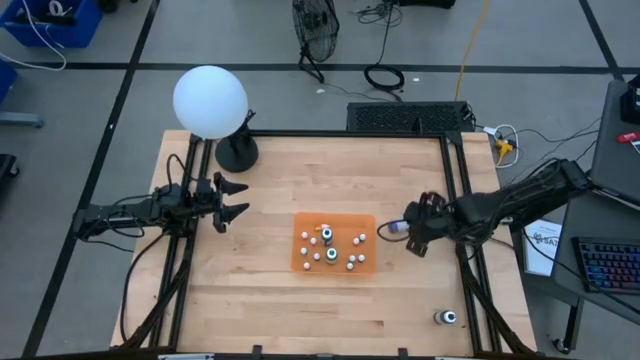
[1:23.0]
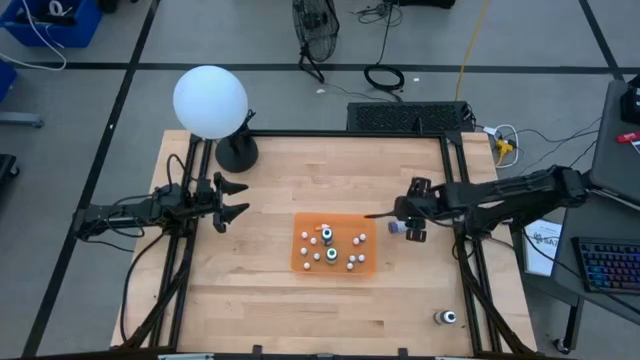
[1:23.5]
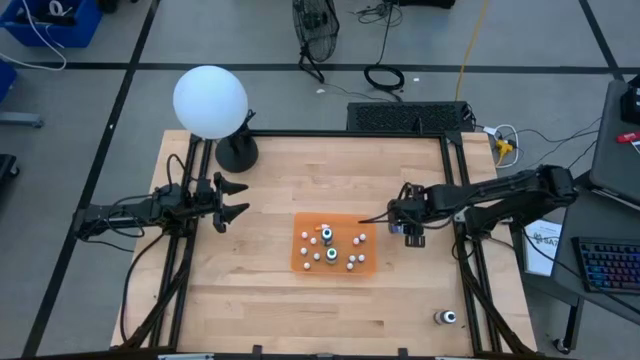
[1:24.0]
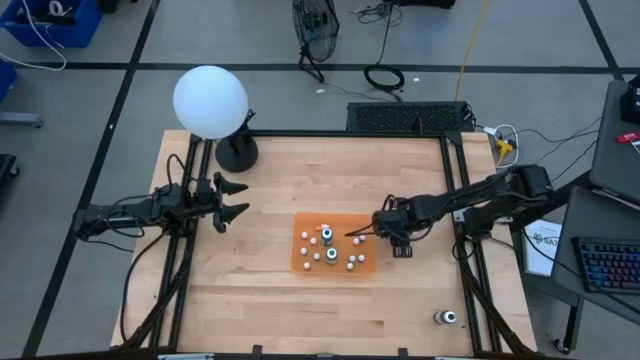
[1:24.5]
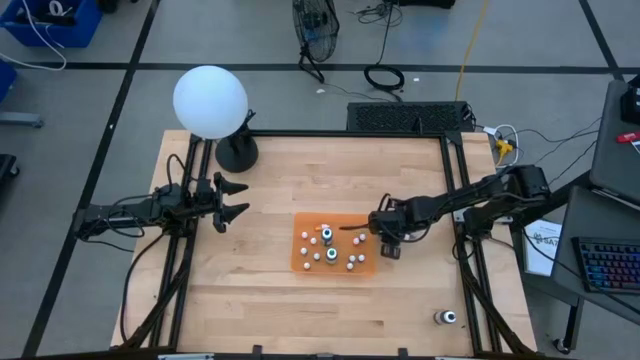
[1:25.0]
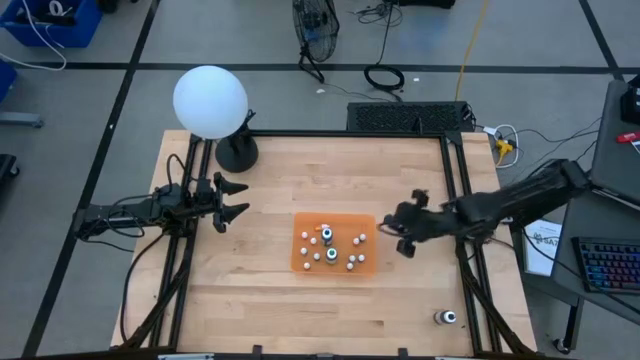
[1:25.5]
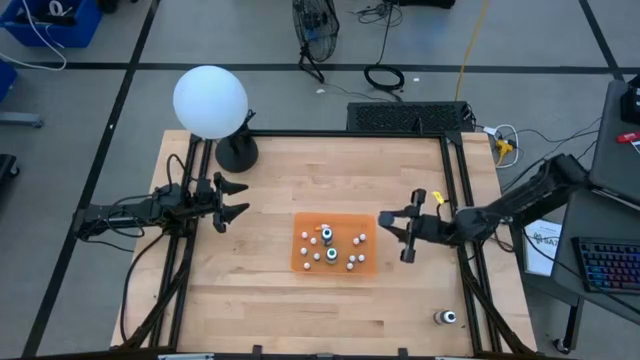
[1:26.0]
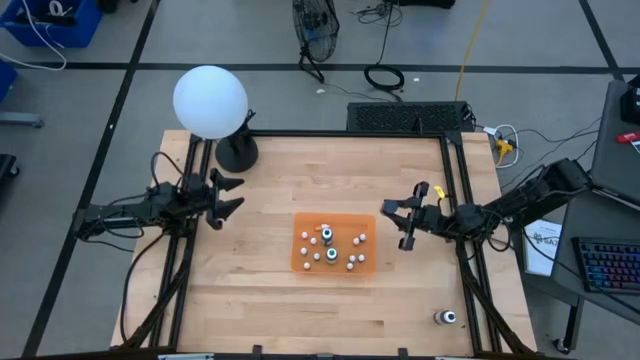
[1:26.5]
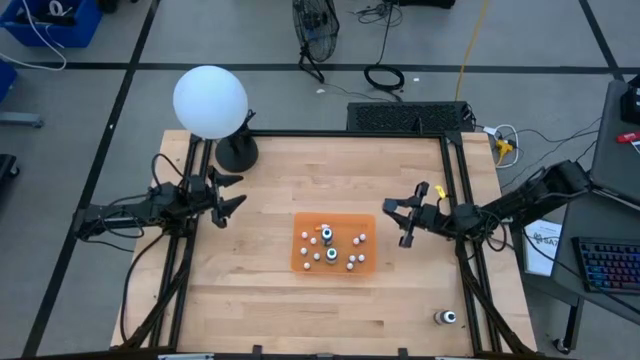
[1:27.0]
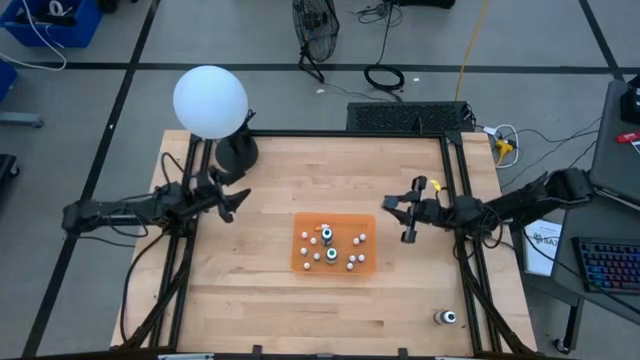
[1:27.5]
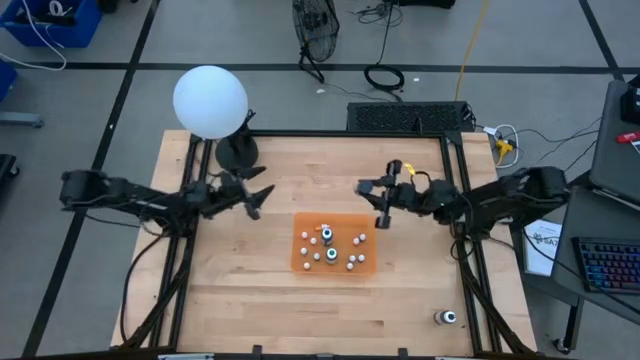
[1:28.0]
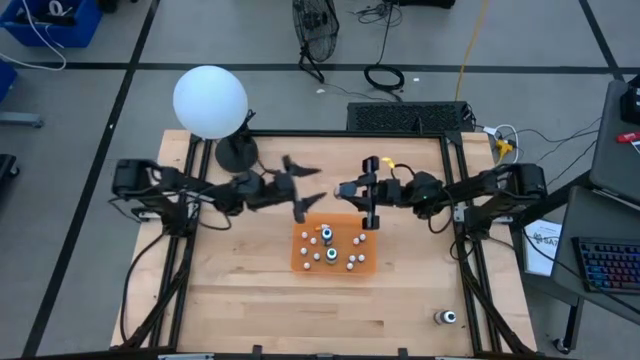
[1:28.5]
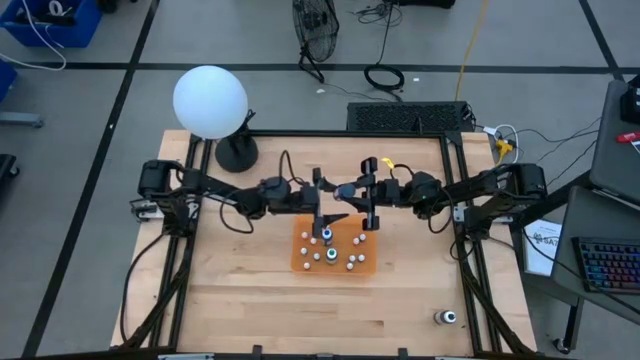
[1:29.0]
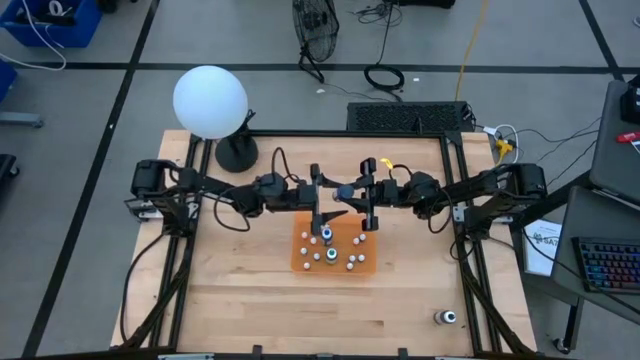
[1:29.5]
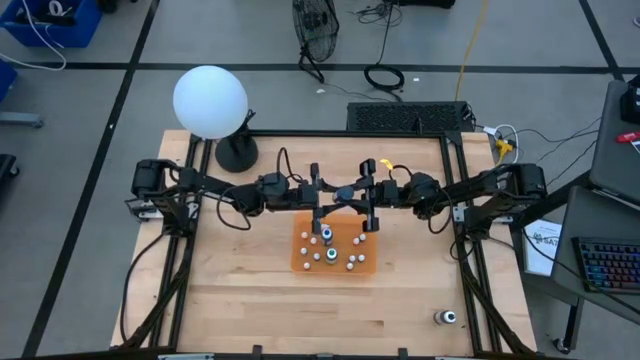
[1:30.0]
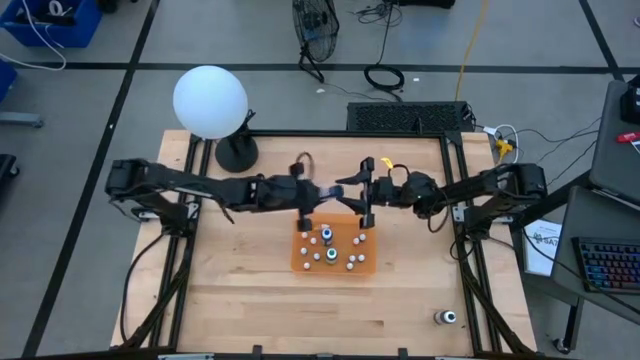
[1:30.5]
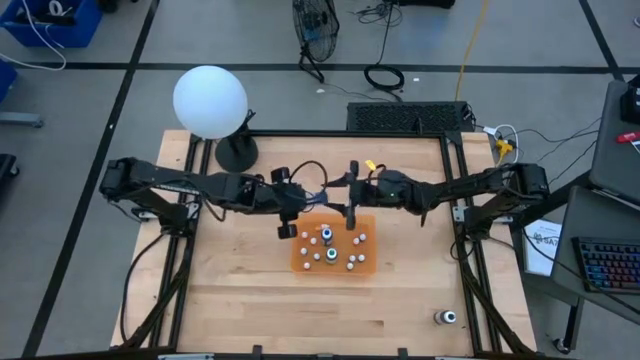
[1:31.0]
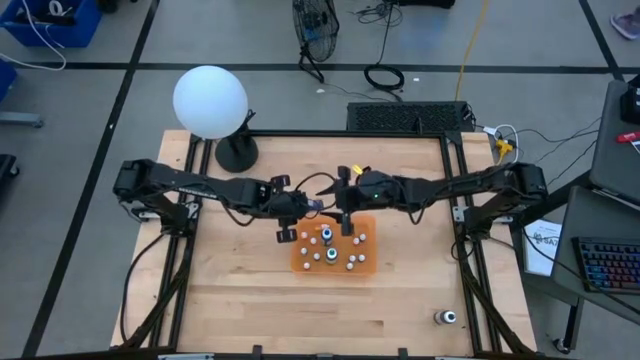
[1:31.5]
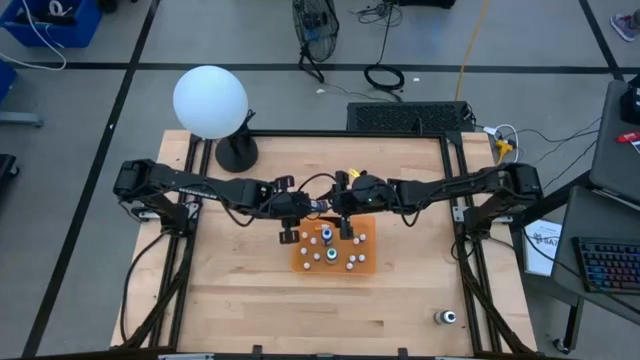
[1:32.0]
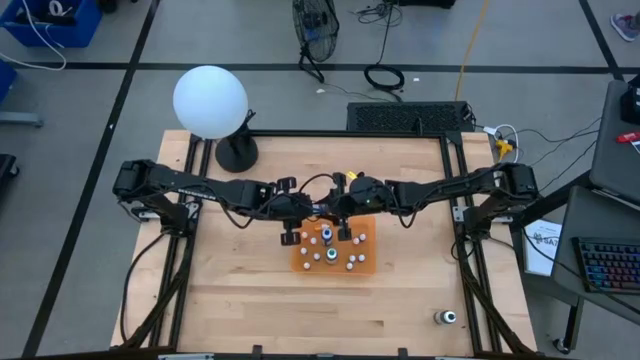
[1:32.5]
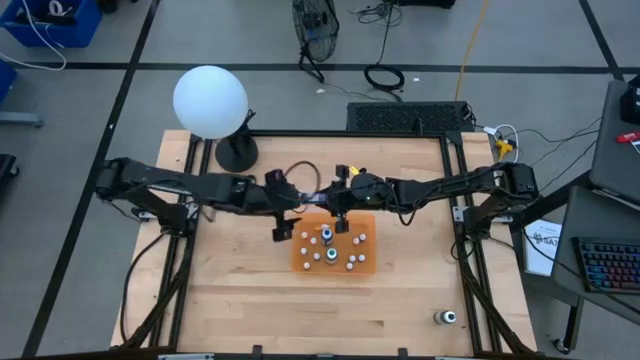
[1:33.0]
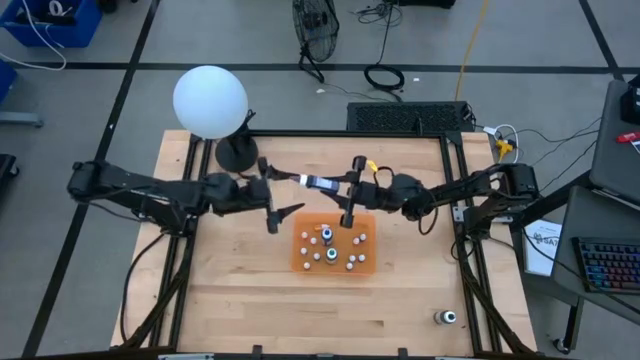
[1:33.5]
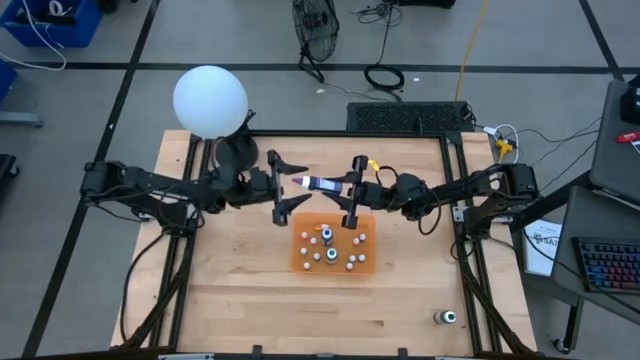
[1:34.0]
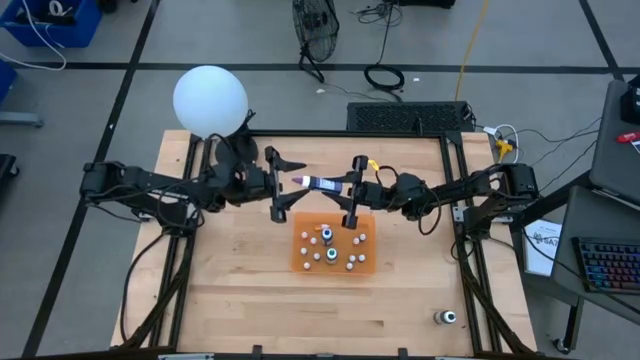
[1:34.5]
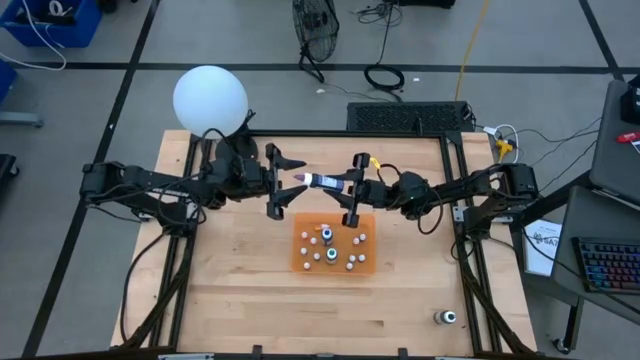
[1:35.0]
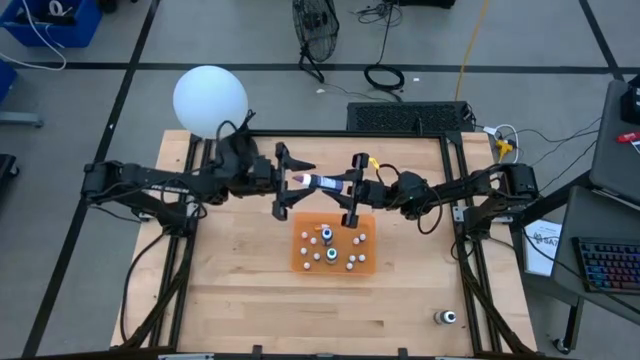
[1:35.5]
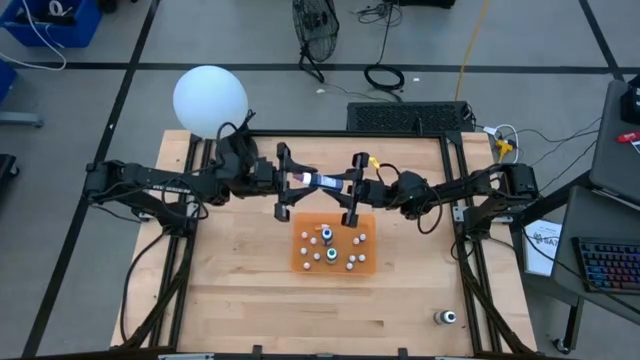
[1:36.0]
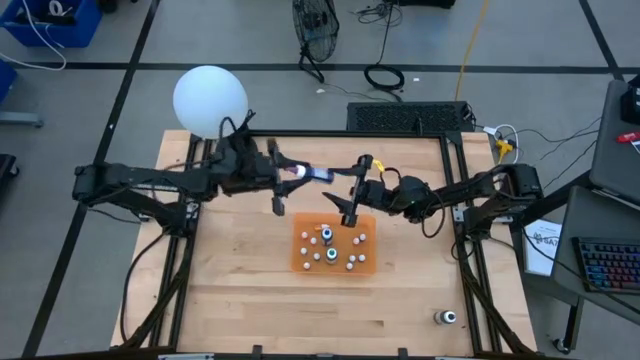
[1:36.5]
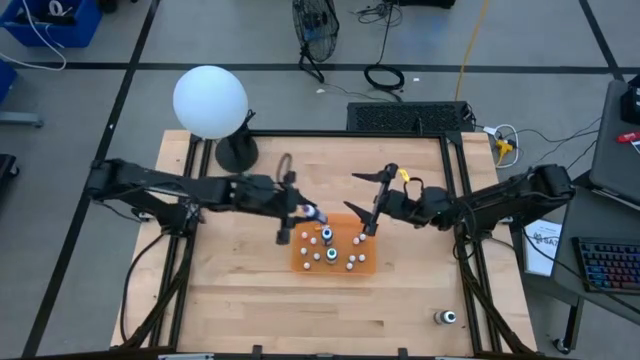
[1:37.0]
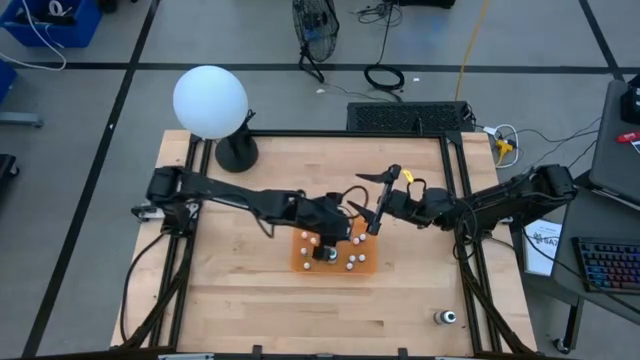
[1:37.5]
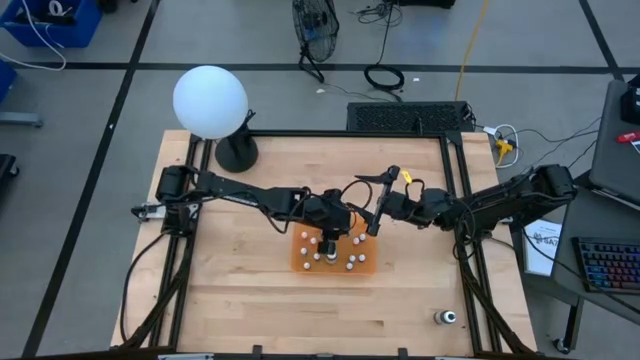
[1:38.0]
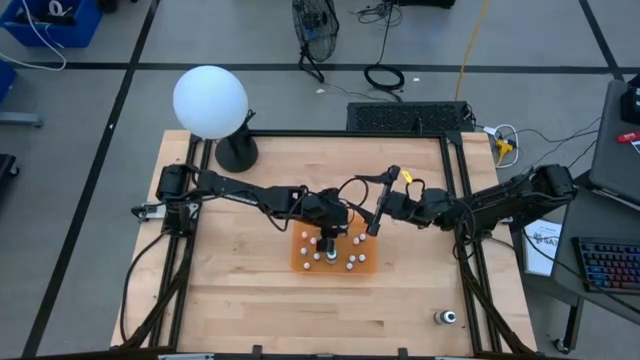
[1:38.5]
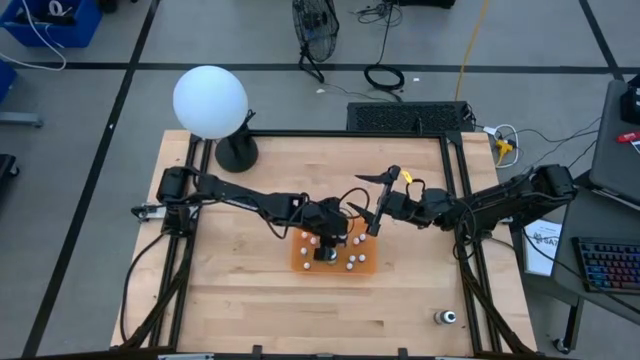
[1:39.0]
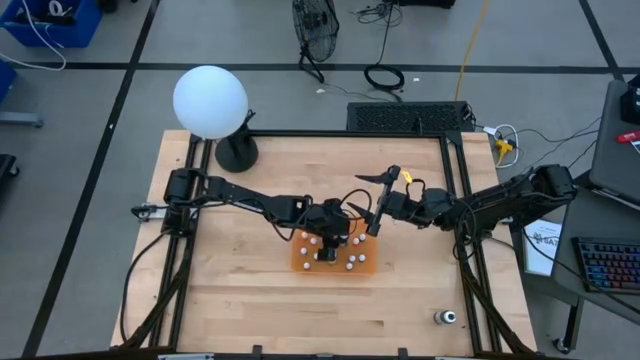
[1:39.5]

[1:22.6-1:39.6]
Task: Pick & Place food coloring
Put the large purple food coloring bottle into the container

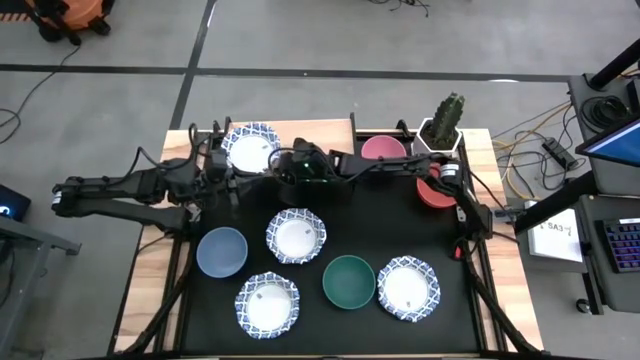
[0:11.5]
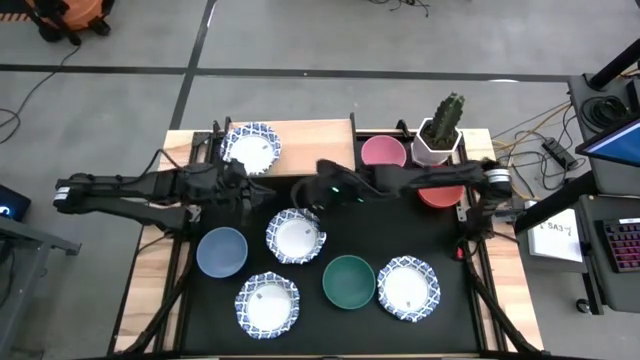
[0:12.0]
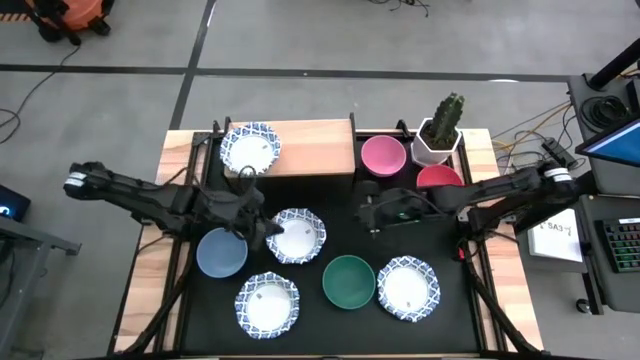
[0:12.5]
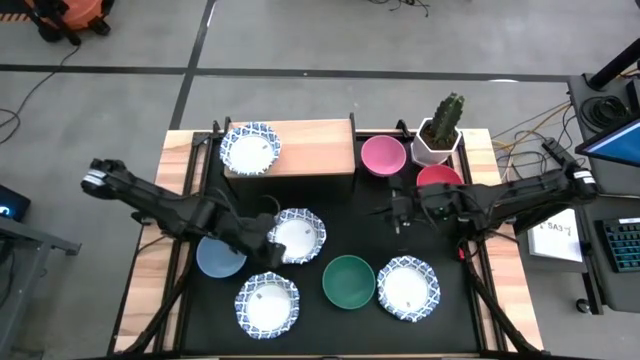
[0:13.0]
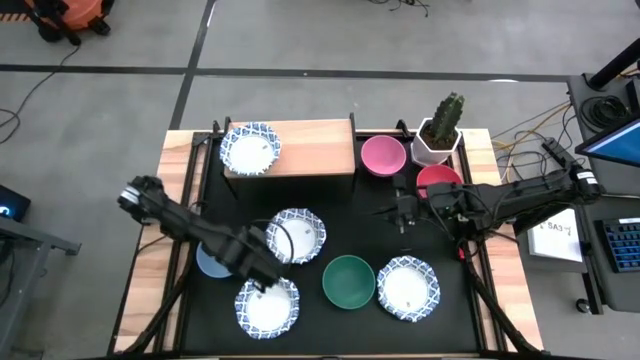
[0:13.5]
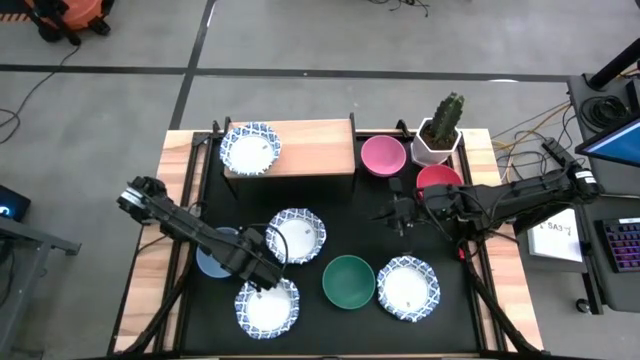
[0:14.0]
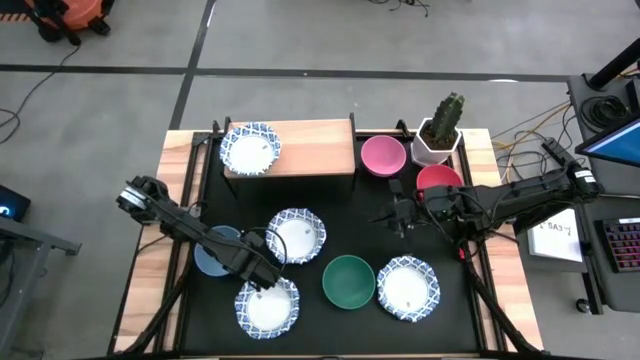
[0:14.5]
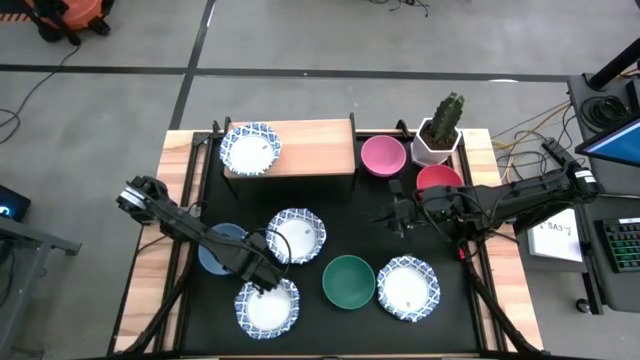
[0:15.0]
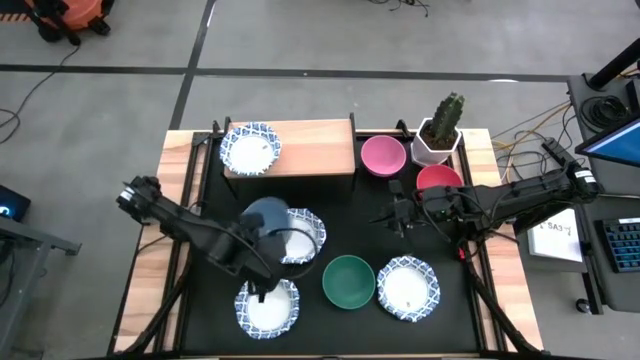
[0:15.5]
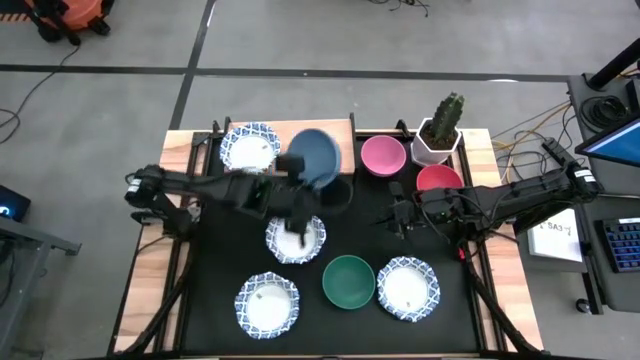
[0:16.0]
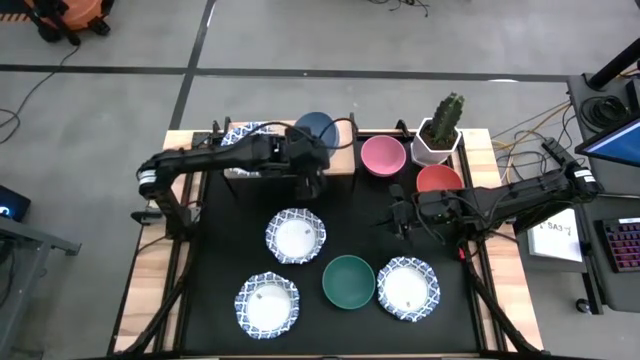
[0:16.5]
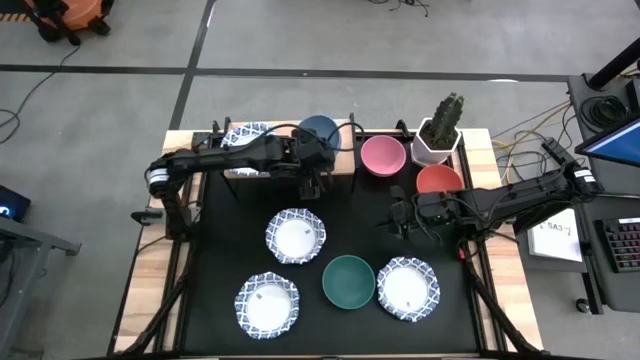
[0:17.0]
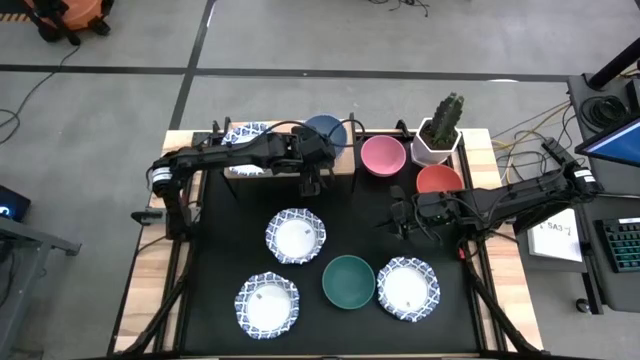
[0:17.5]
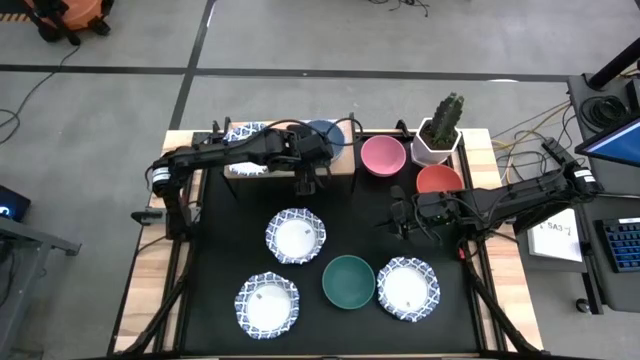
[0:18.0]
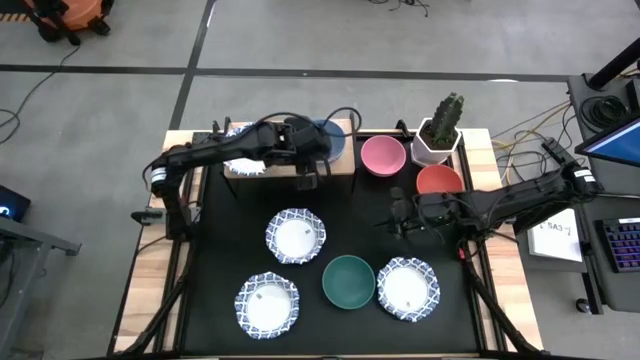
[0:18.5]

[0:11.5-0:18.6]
Task: Place and stack bowls onto a shelf
Put the blue bowl on the shelf
